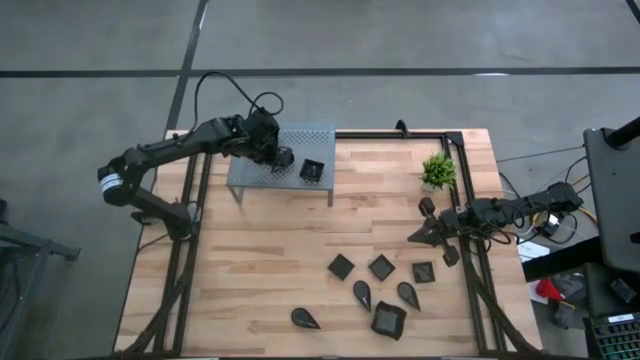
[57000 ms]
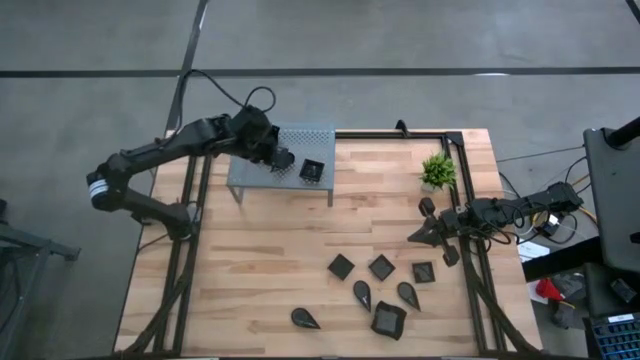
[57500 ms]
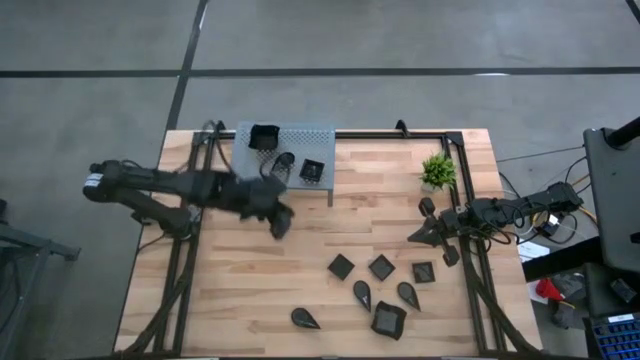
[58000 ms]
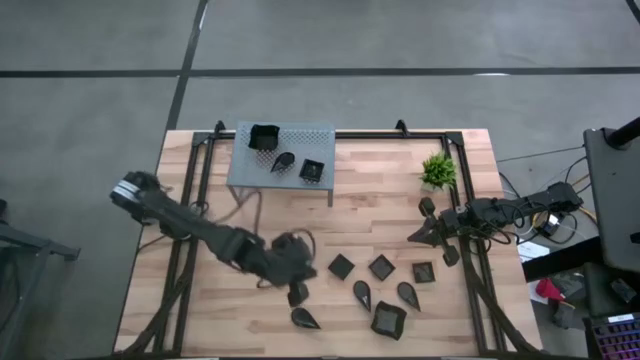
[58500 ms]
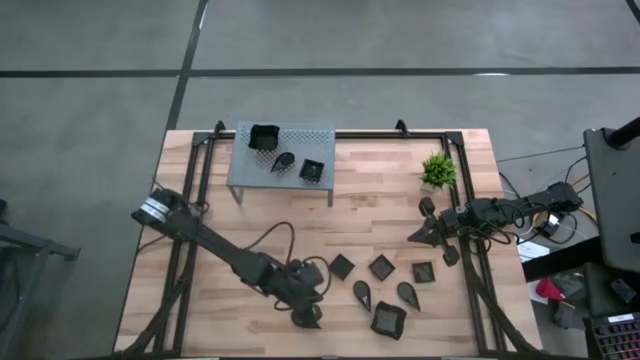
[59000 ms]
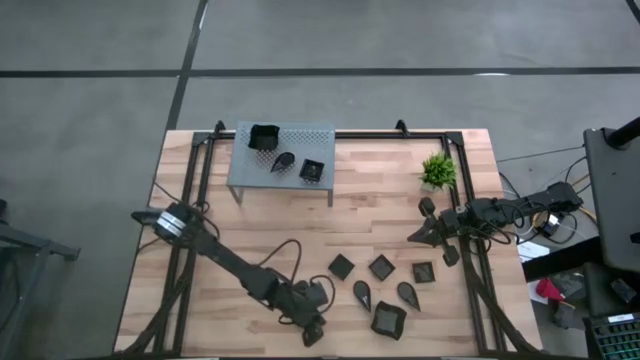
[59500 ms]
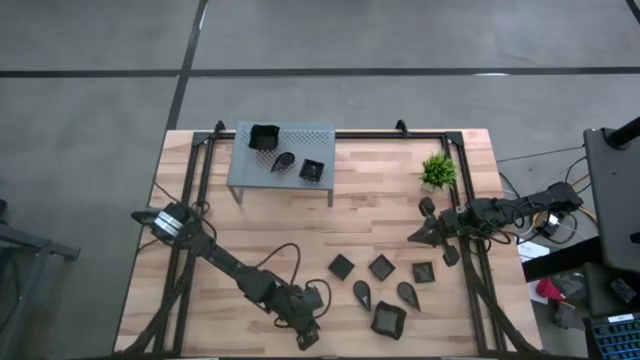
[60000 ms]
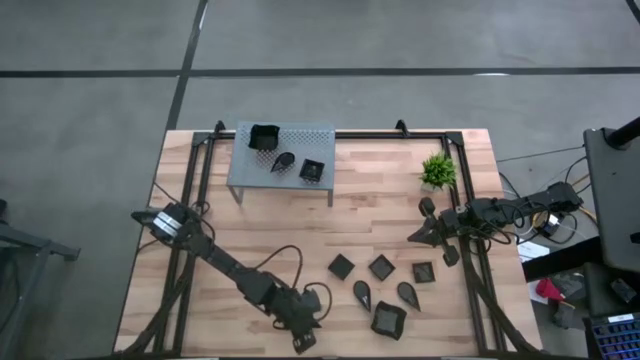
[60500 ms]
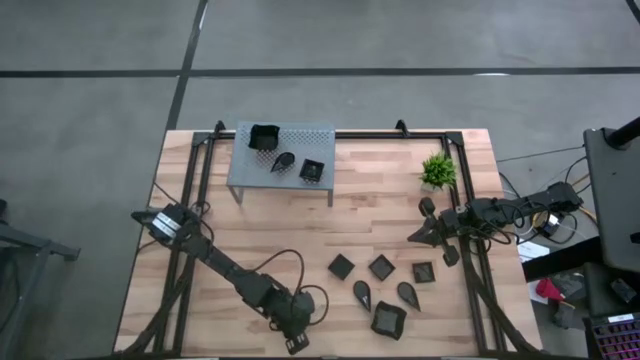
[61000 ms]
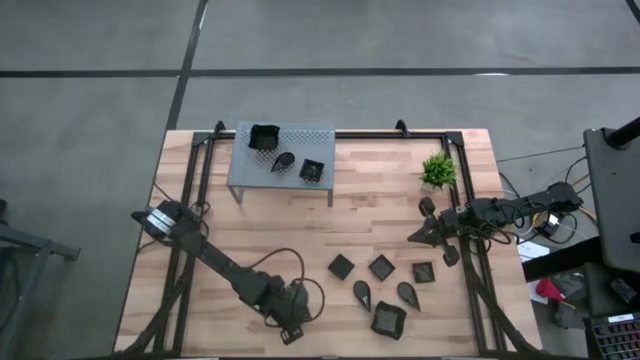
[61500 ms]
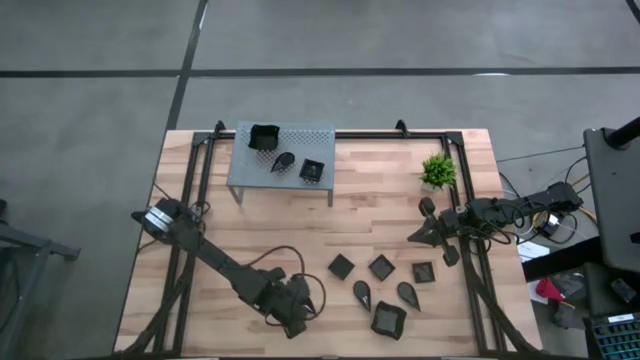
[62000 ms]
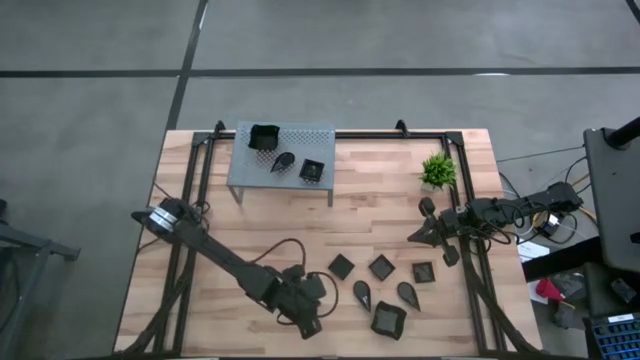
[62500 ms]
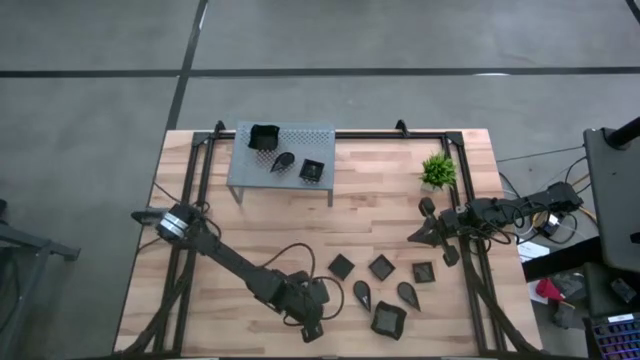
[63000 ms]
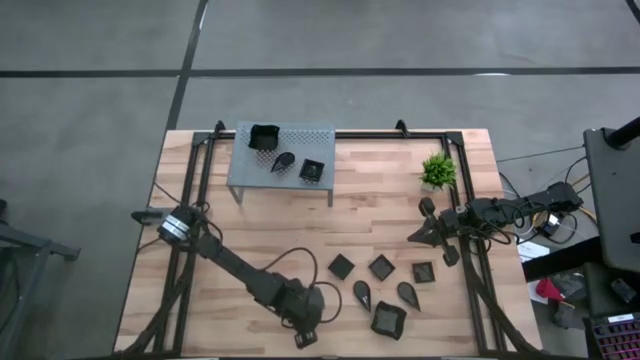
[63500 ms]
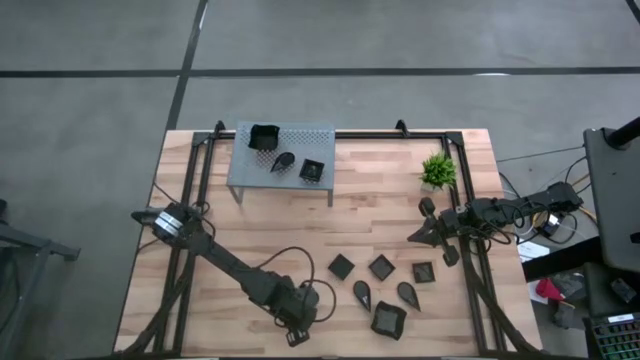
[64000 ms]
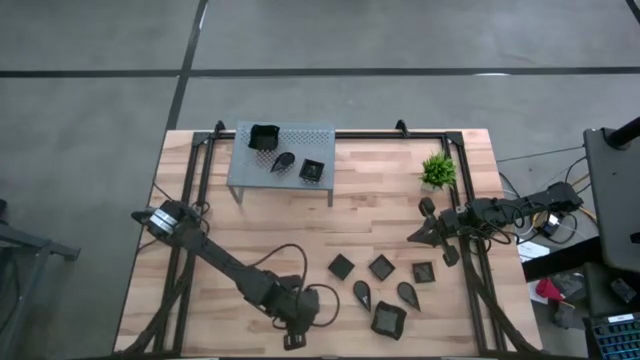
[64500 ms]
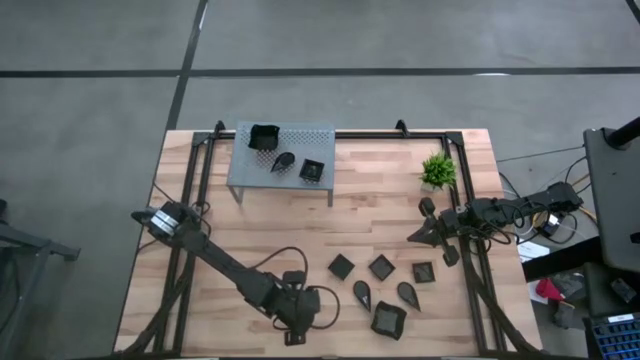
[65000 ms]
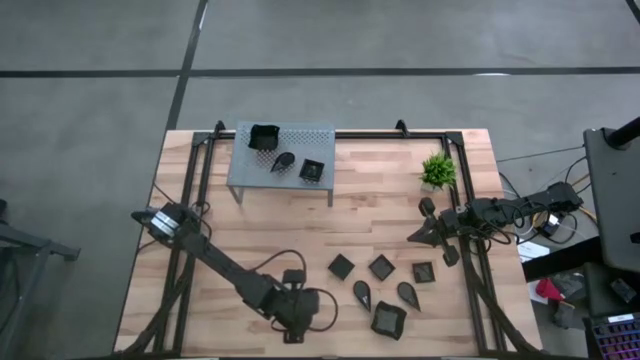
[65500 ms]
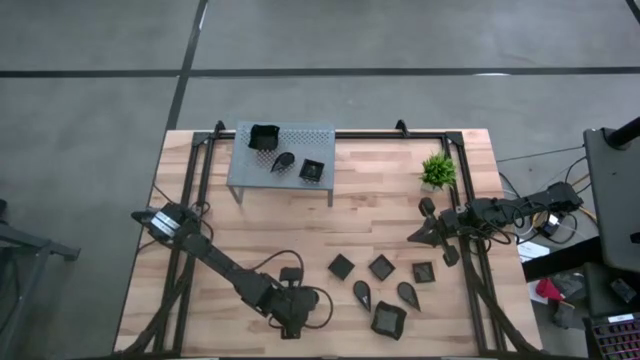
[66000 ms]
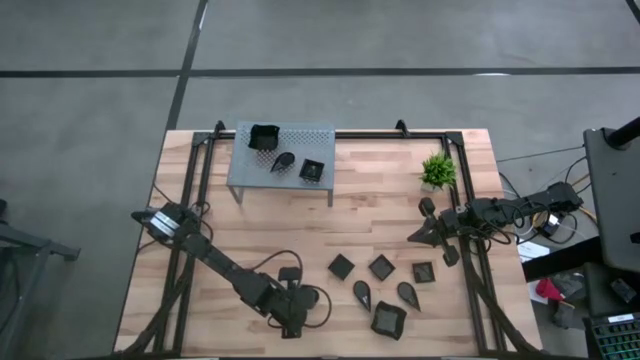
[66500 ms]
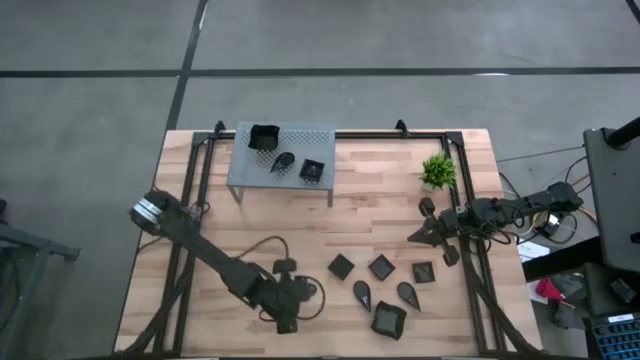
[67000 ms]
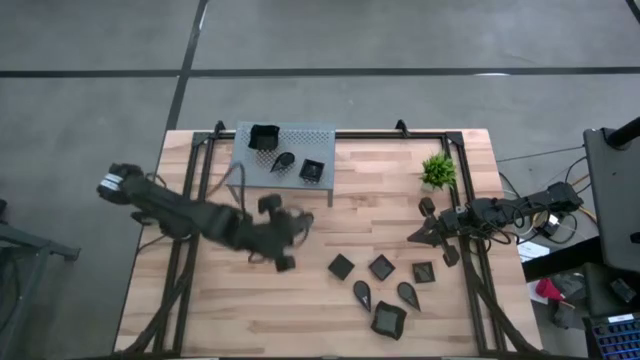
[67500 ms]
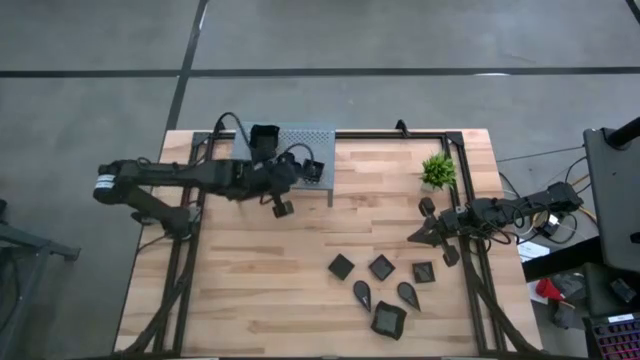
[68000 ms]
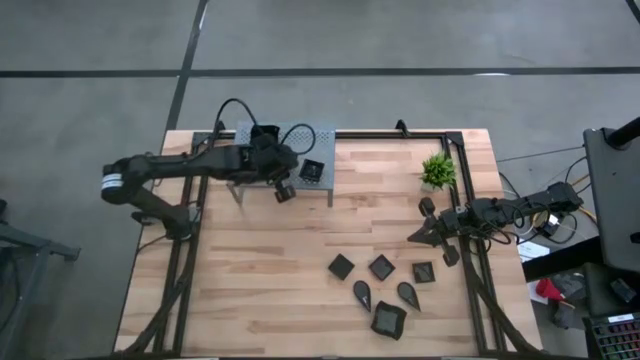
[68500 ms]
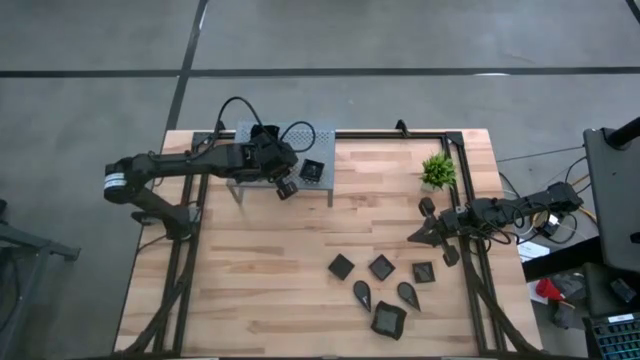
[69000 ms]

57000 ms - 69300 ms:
Task: Pick & Place Mini shaped plates
Stack the black leaf-shaped plate on top of the black leaf-shaped plate on the shelf

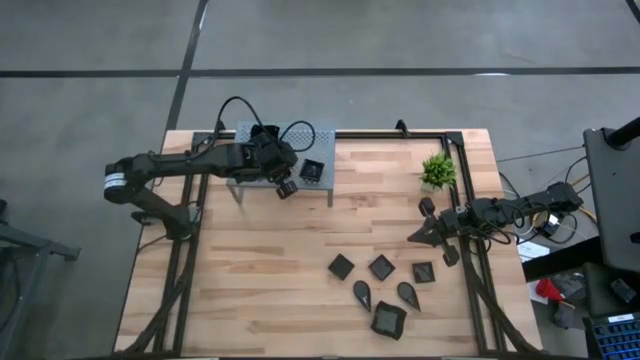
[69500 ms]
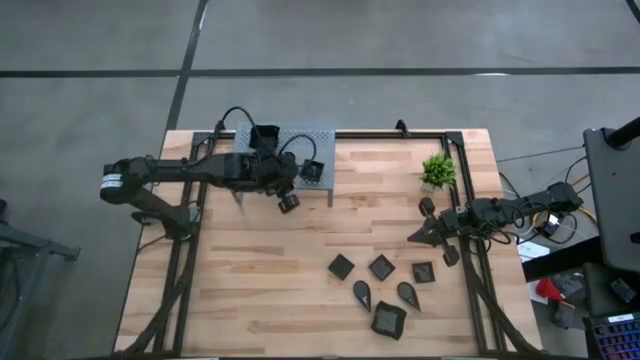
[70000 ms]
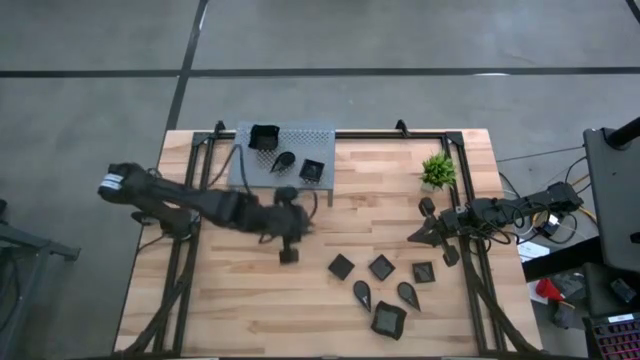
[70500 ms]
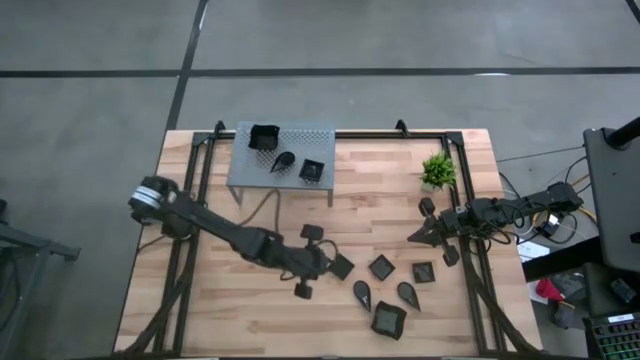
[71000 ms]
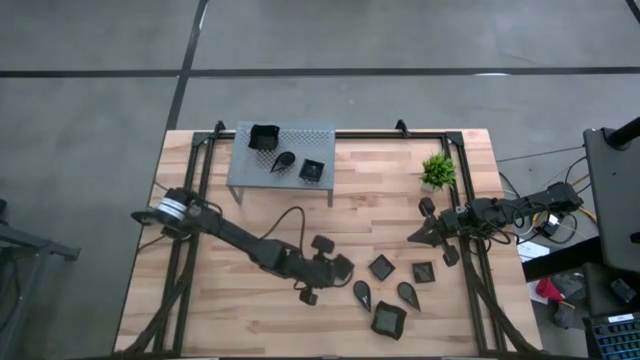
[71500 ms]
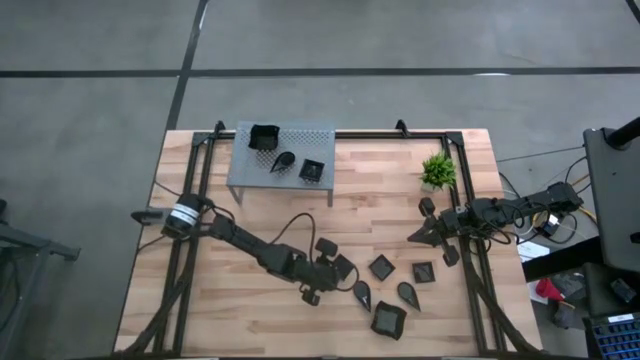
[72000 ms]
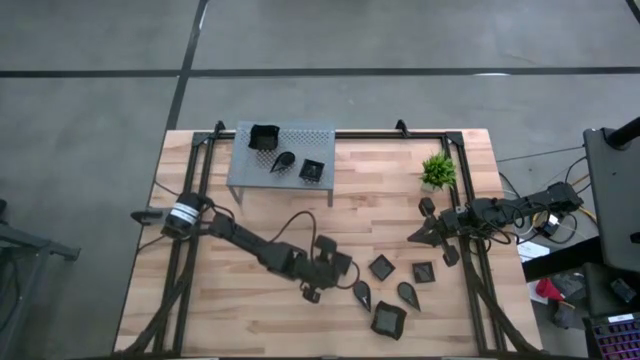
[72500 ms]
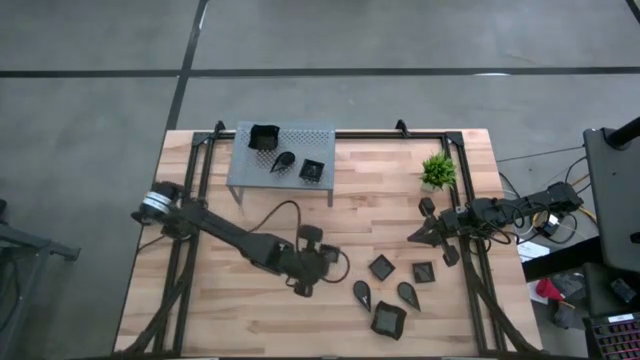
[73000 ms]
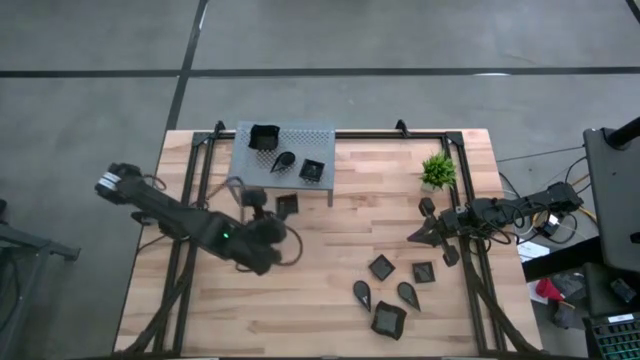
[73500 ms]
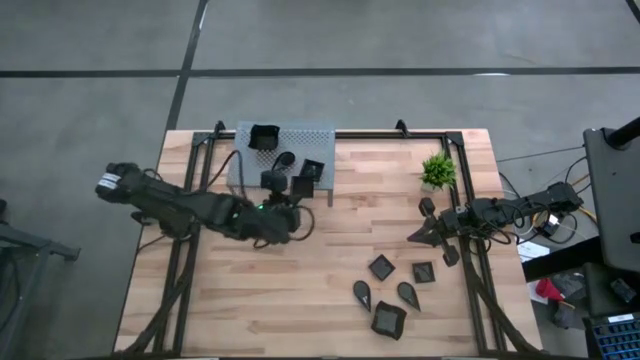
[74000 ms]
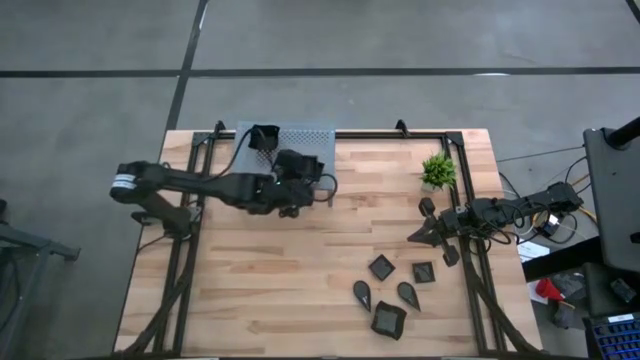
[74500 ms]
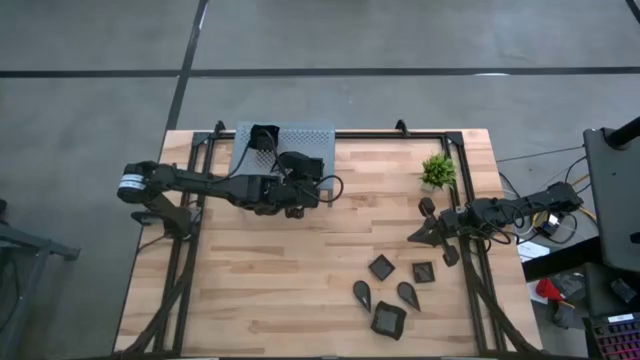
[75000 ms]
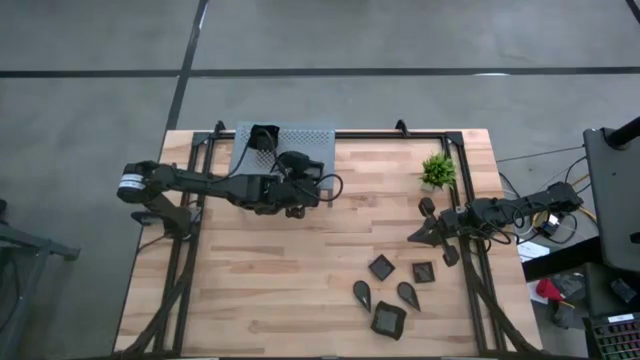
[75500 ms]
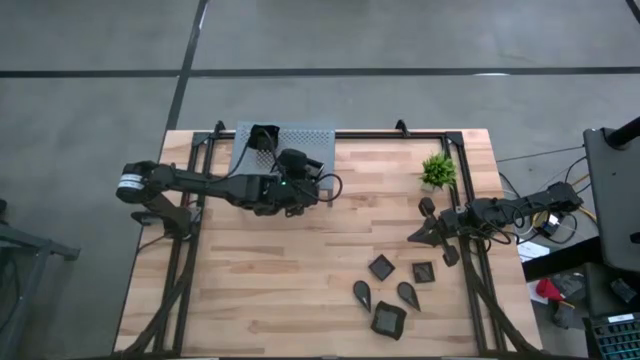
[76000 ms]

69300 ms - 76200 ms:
Stack the black square plate on top of the black square plate on the shelf

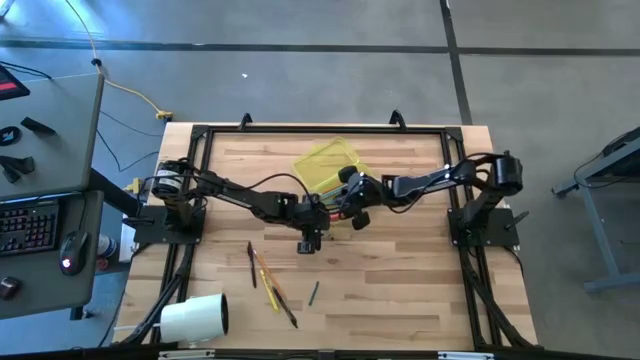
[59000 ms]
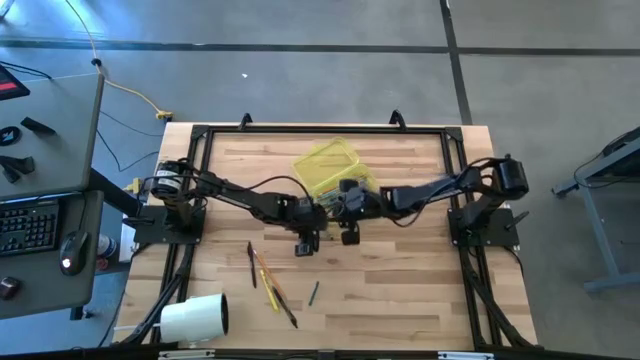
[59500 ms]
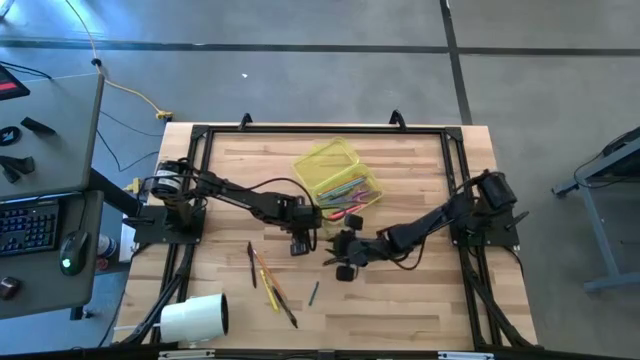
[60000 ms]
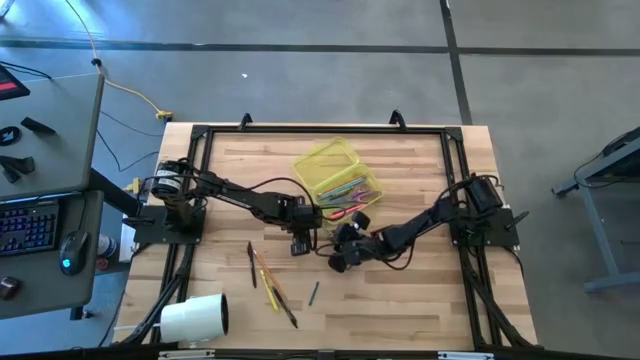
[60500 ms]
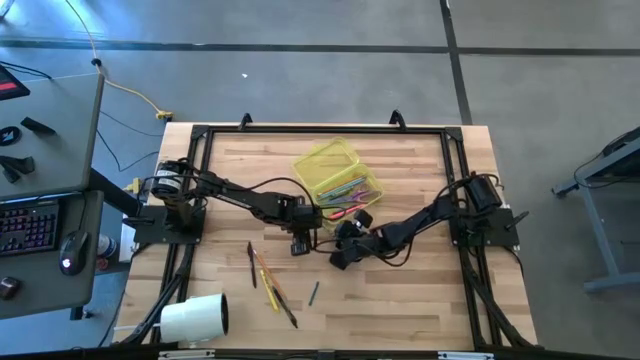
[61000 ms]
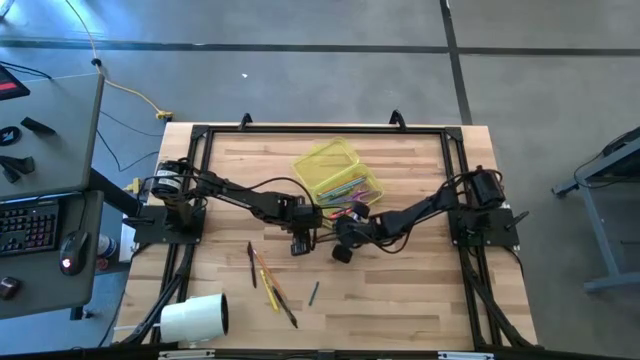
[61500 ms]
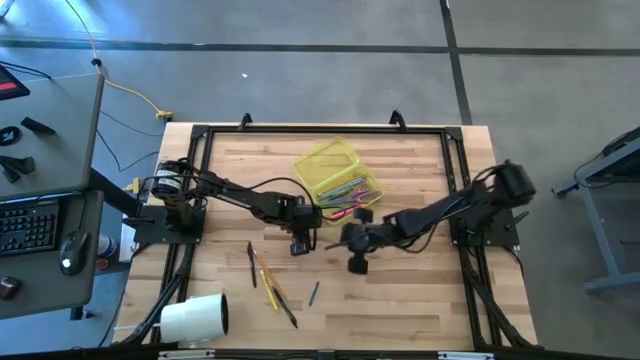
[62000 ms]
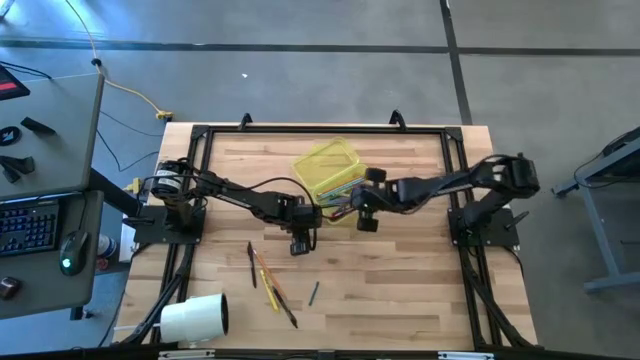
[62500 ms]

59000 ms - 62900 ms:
Task: Pick & place school supplies into a supply box
Put the green crayon into the supply box
